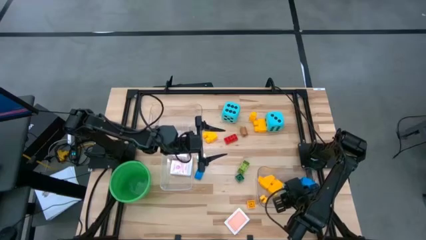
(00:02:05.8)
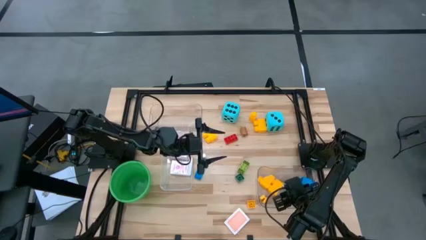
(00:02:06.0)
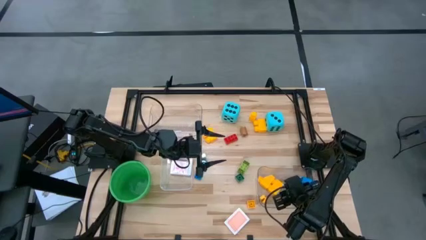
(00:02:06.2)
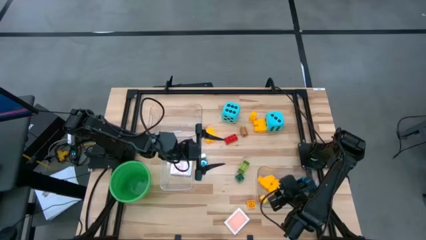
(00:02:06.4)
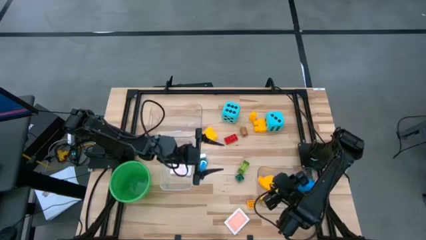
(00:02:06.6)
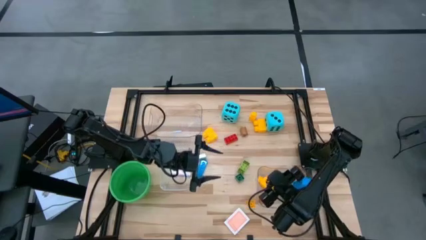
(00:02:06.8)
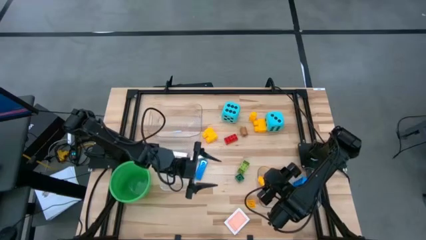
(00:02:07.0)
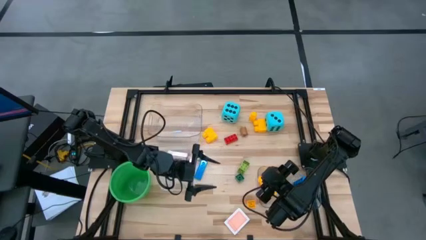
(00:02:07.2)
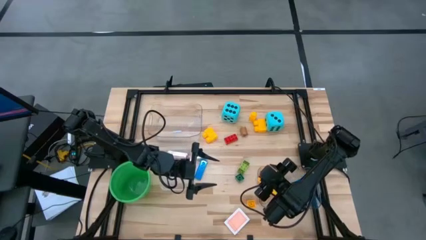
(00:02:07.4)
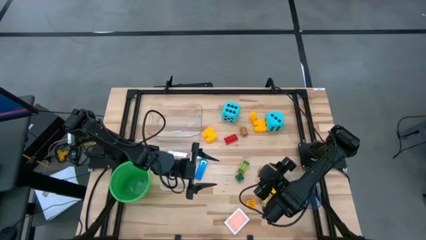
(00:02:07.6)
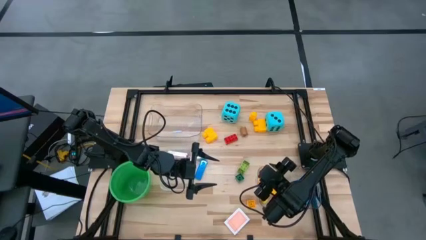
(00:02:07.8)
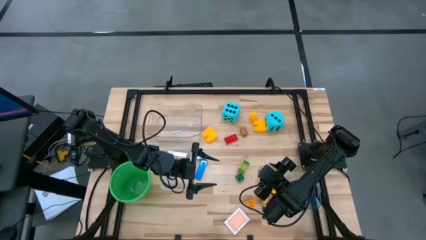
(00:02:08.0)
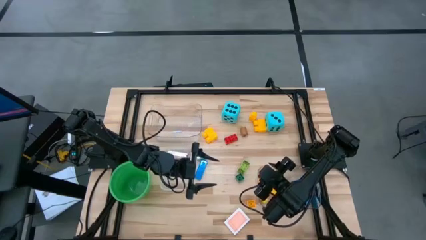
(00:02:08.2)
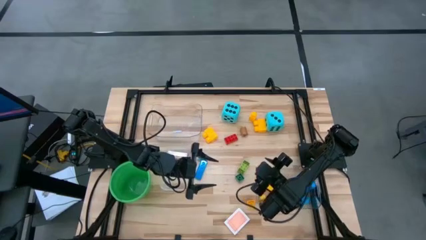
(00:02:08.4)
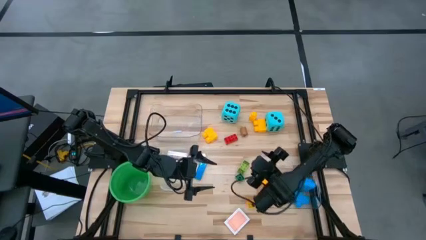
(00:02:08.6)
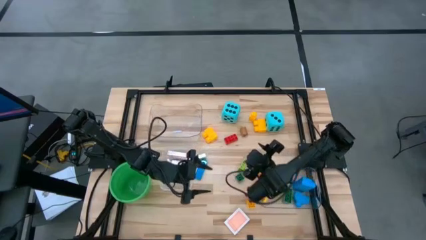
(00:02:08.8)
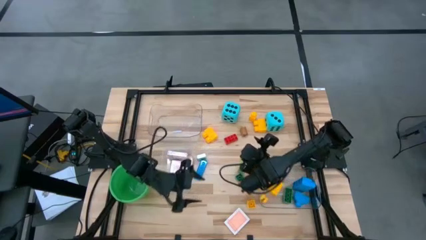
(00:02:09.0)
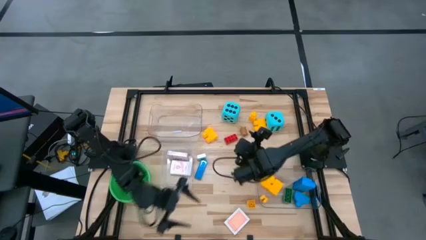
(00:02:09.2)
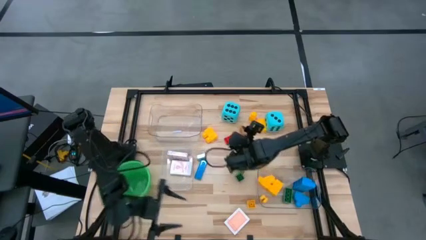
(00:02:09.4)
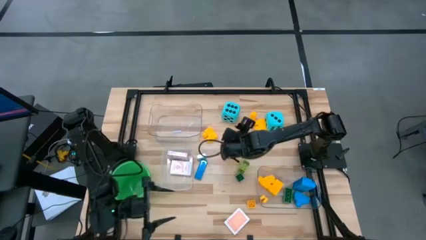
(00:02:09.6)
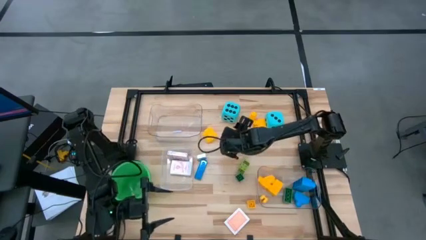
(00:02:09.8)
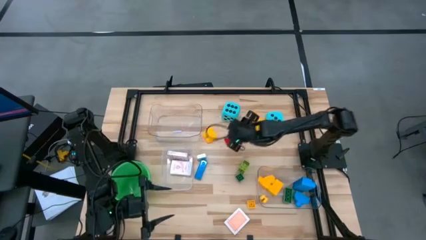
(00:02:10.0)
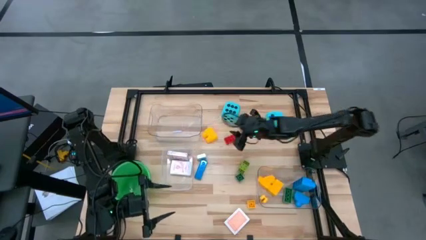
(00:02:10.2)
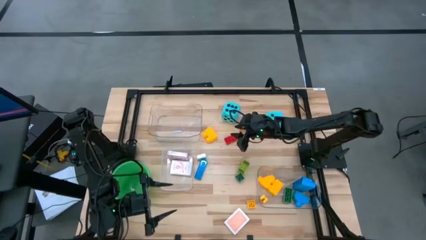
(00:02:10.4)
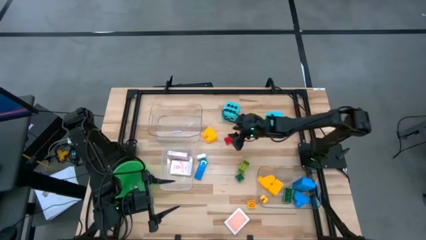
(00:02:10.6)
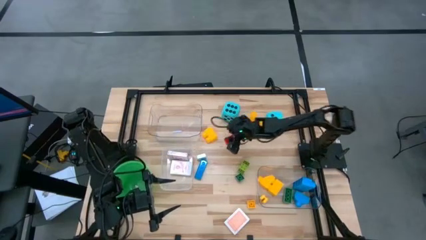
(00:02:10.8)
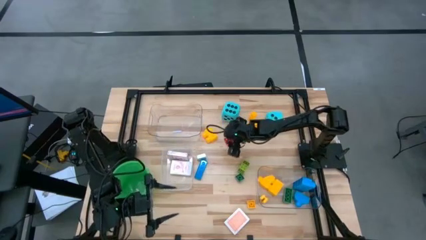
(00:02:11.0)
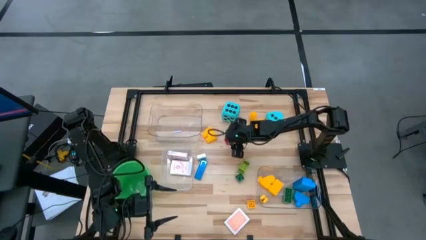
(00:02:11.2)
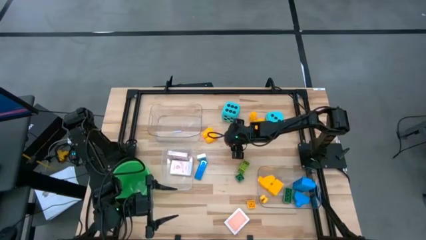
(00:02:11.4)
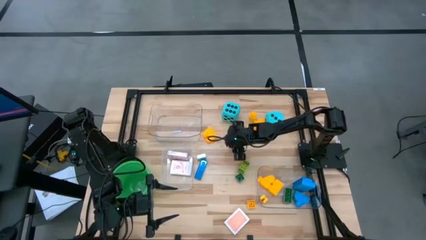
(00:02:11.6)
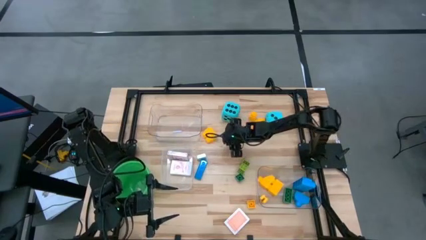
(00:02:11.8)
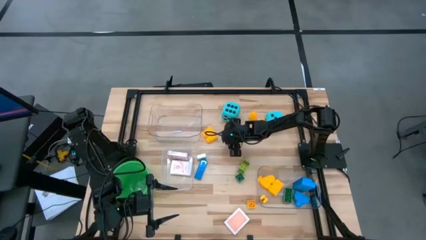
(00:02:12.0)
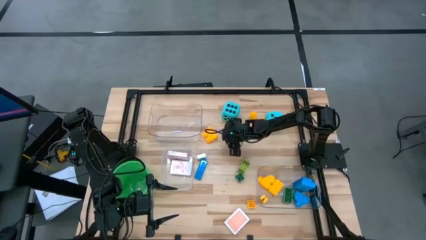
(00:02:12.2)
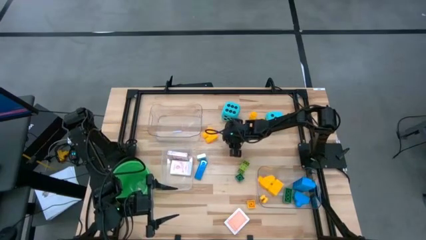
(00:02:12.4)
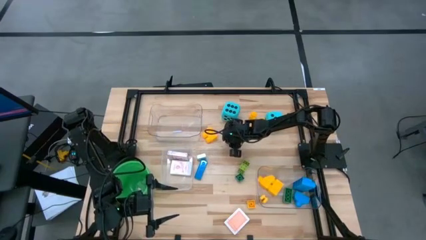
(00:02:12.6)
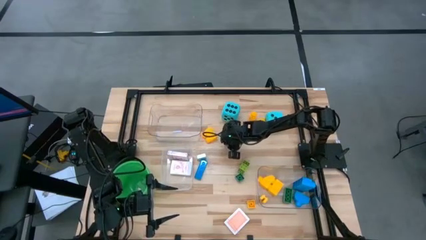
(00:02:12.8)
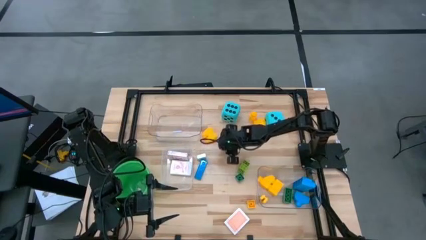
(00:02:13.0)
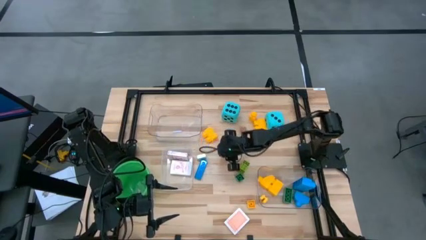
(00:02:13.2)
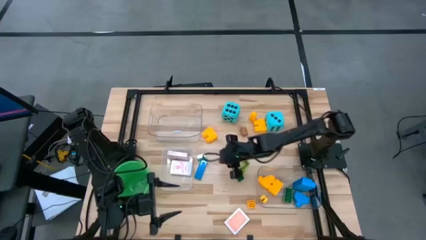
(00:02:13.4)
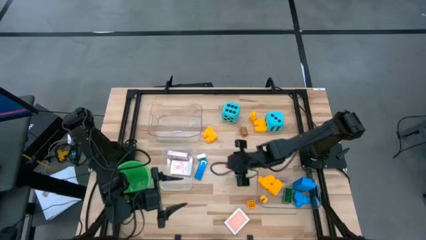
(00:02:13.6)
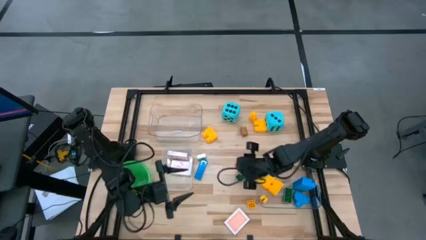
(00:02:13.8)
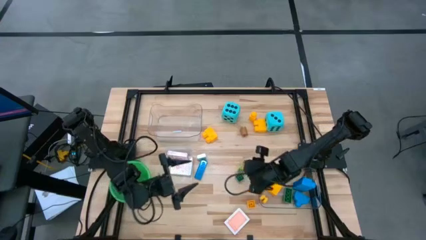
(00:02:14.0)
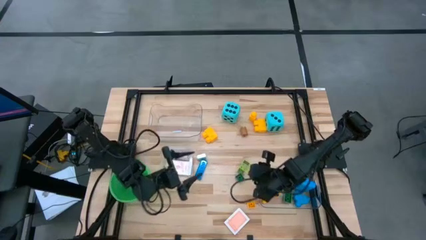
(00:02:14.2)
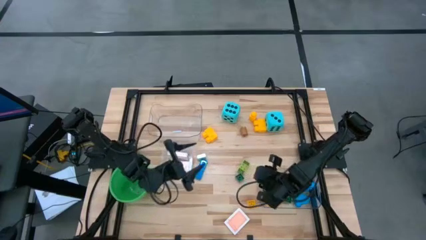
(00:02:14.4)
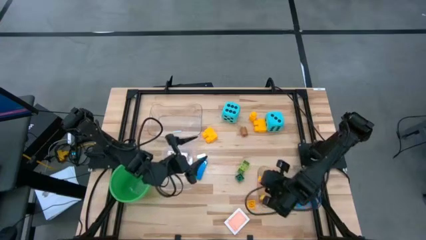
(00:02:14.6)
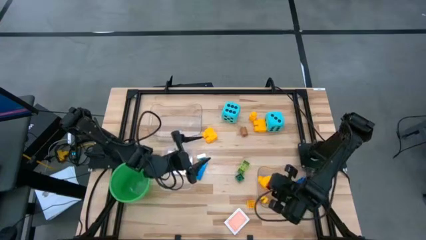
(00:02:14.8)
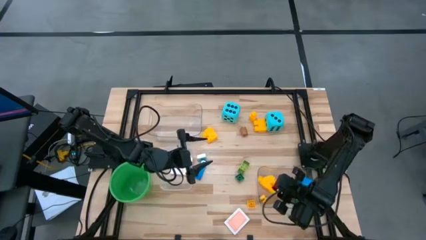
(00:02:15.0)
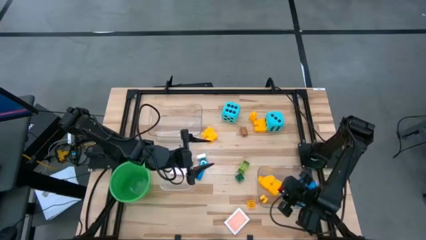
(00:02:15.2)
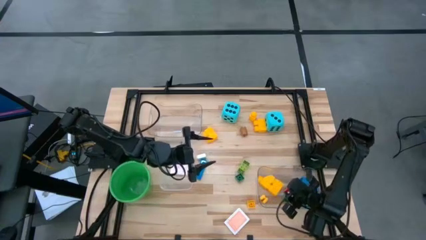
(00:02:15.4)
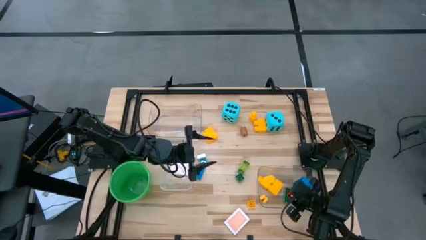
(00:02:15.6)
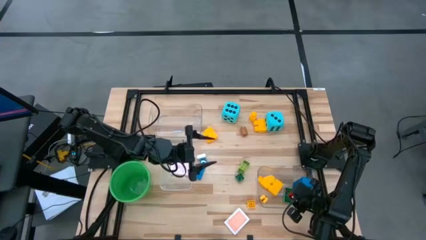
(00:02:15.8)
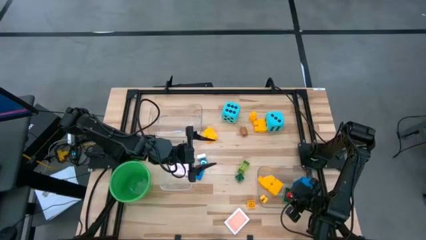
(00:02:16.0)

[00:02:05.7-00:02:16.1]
Task: Pick & Place Toys
Put the red game piece into the bottom right transparent bin

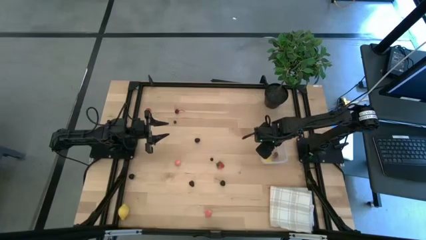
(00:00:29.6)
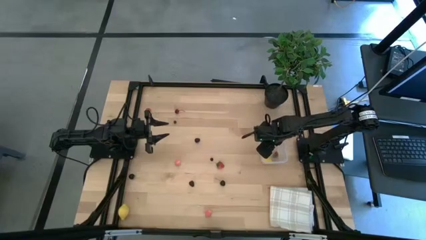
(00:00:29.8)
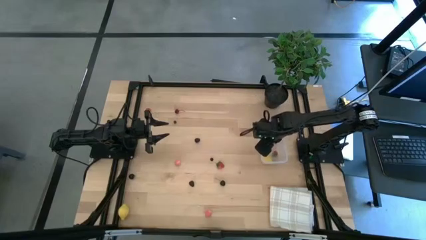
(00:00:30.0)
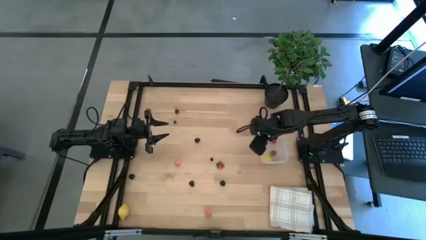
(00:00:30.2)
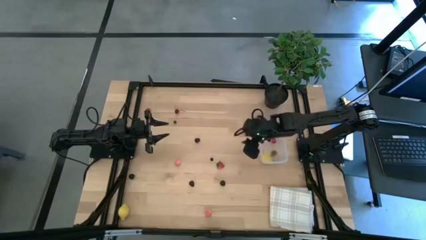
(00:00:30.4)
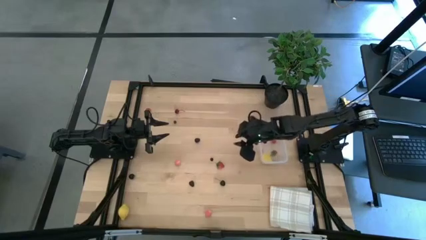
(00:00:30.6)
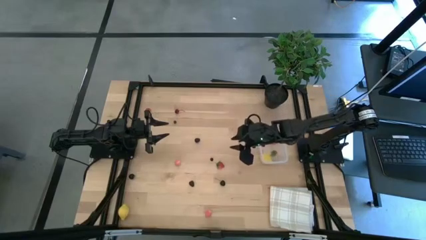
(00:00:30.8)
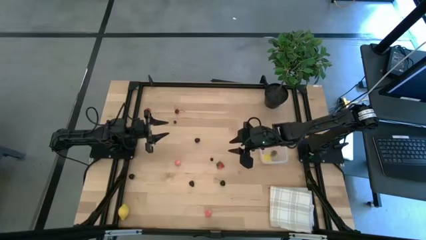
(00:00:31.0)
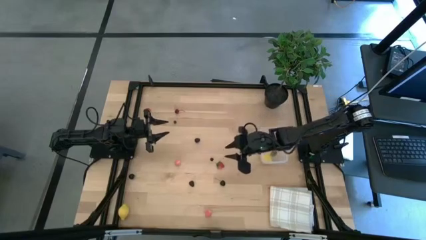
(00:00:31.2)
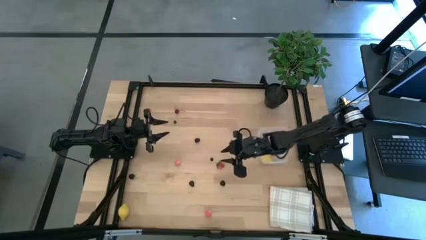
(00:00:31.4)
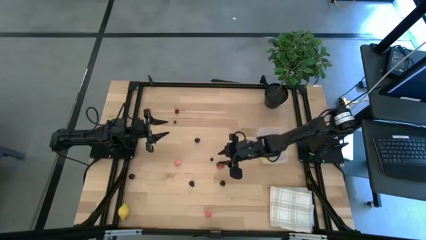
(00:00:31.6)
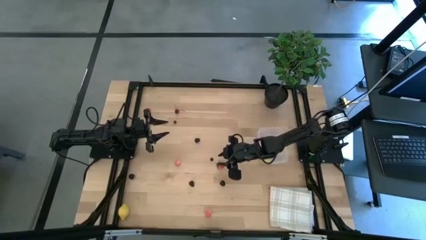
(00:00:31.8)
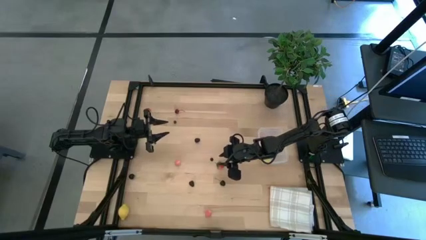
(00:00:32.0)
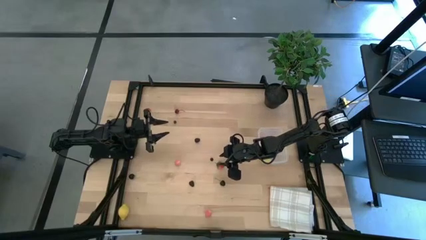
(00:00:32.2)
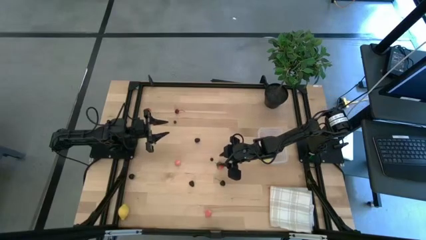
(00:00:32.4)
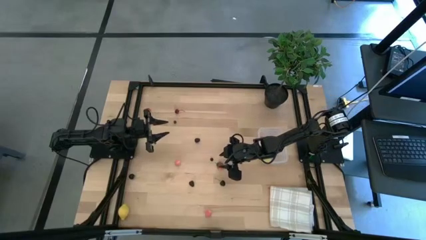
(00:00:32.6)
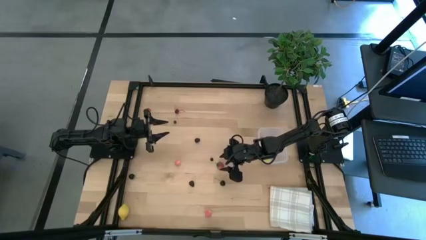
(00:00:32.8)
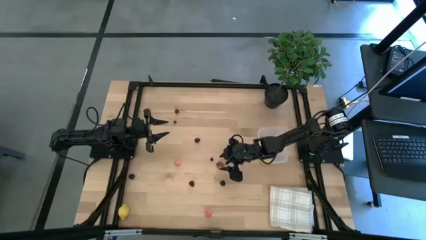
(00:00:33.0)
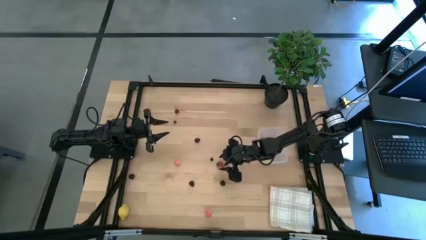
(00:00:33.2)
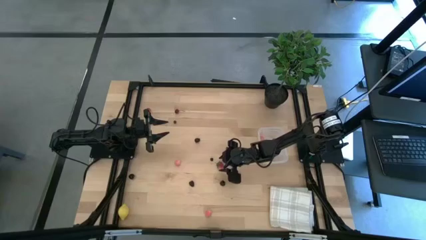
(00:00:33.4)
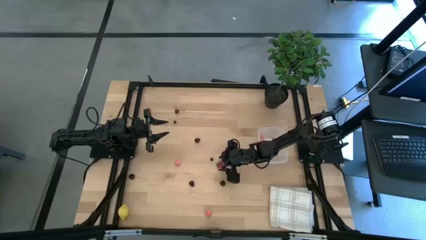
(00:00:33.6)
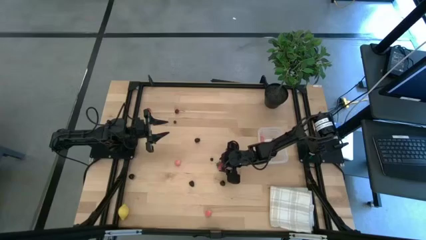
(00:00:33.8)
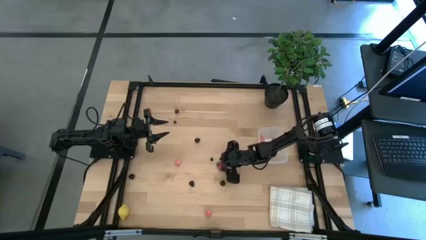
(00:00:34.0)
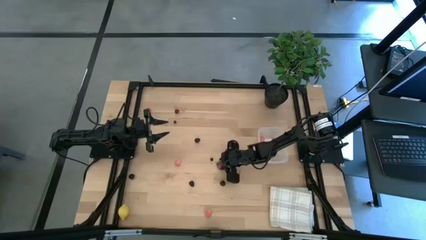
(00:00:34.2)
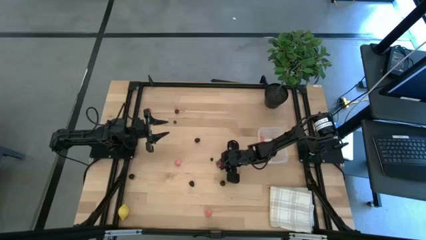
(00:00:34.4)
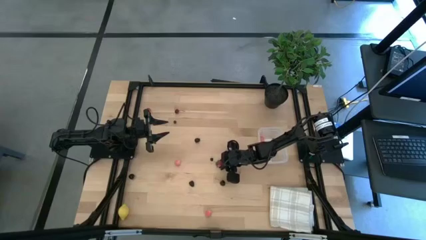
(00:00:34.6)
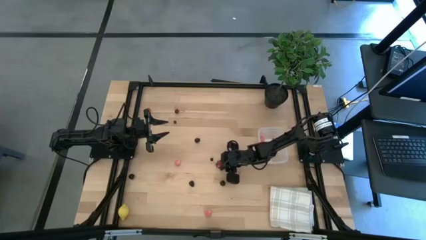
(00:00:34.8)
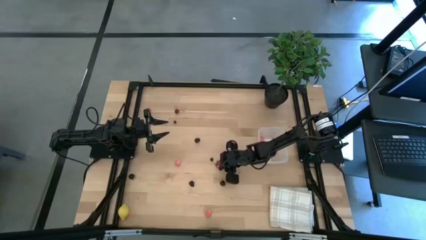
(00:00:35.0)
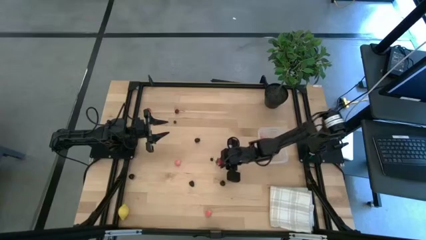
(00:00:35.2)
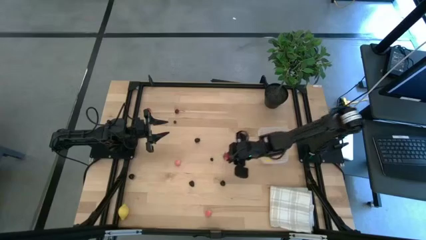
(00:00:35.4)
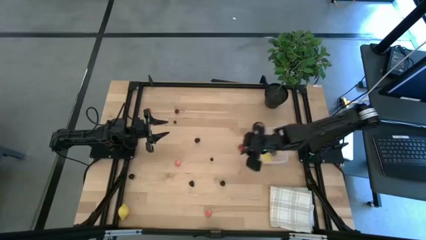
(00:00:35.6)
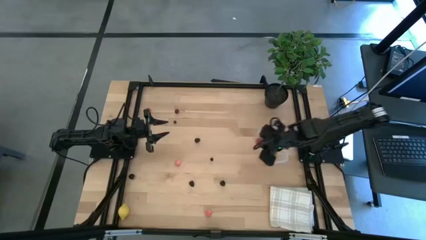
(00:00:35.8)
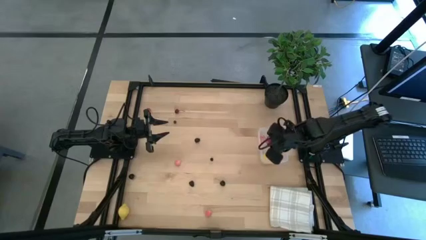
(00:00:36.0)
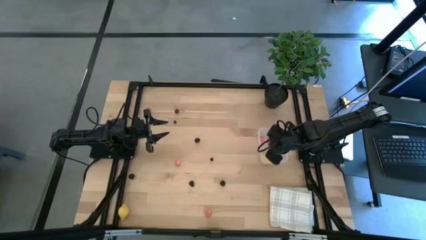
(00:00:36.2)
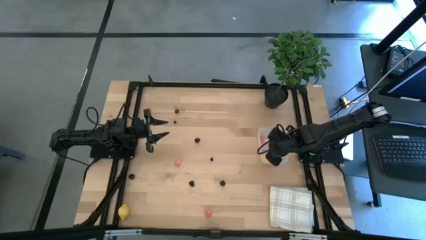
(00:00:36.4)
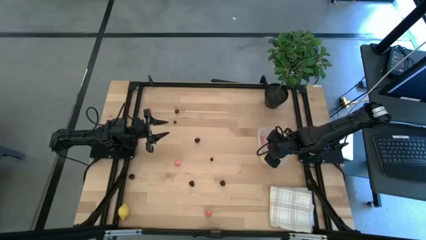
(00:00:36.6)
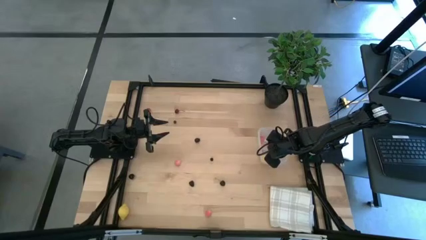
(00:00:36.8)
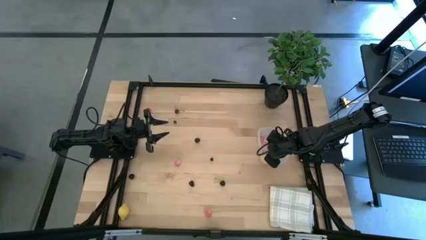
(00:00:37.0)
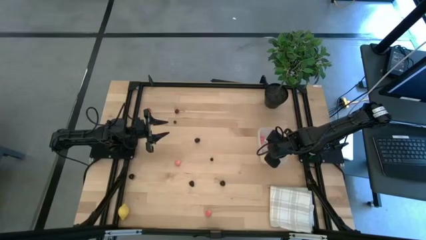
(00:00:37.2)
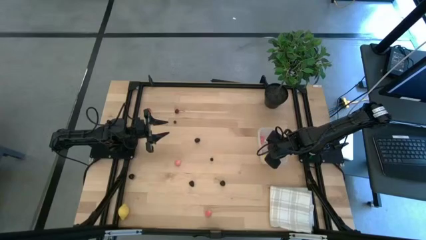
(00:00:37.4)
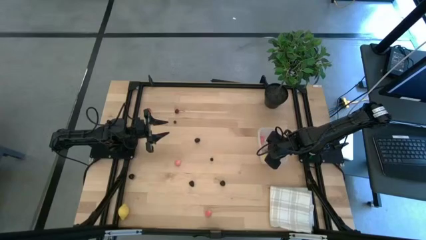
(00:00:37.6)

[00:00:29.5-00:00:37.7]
Task: Pick and placing Produce into tupperware
Put the bottom strawberry into the transparent bin
